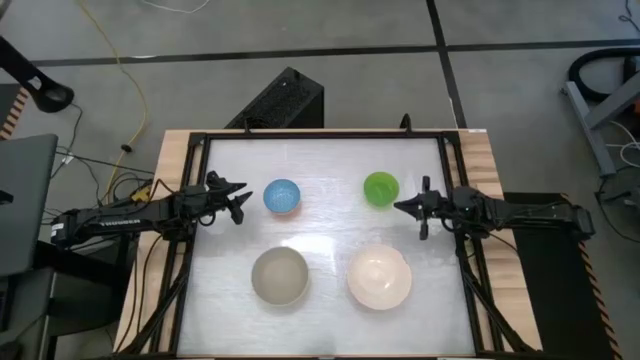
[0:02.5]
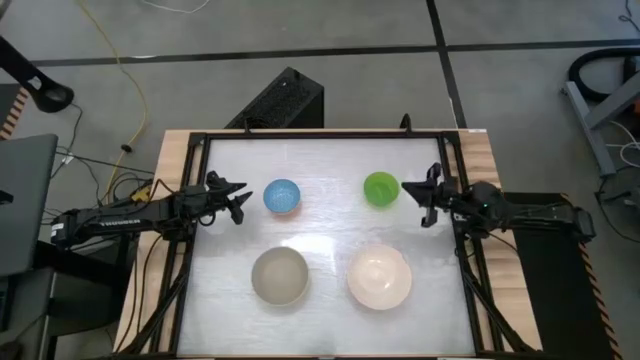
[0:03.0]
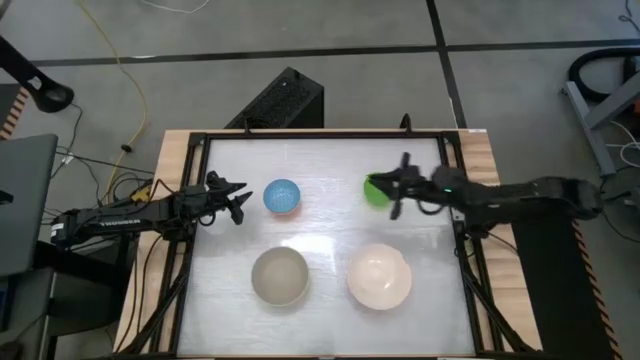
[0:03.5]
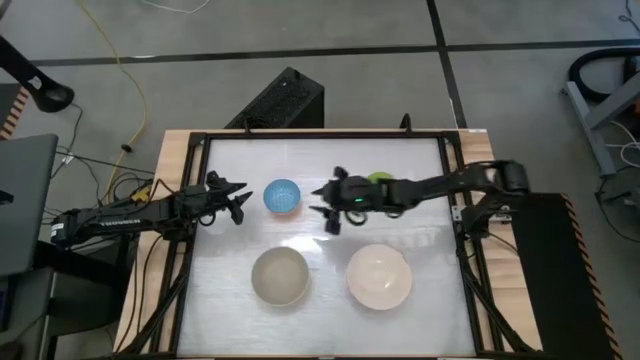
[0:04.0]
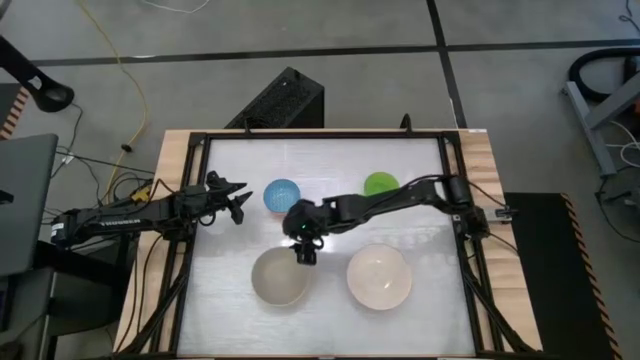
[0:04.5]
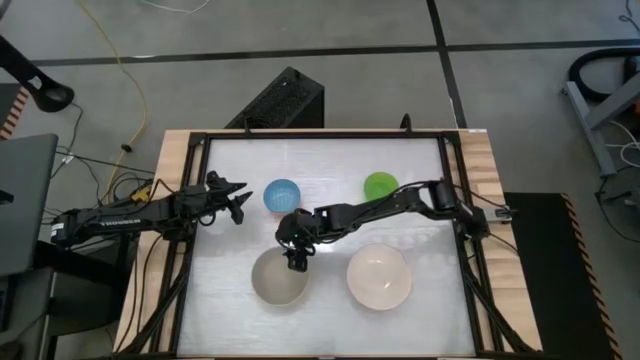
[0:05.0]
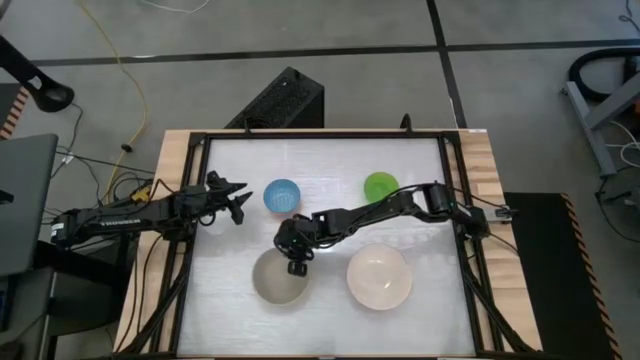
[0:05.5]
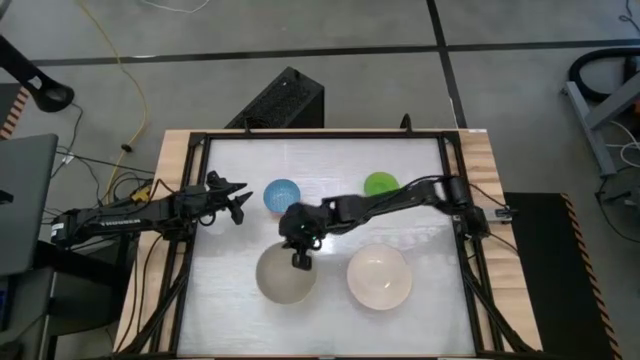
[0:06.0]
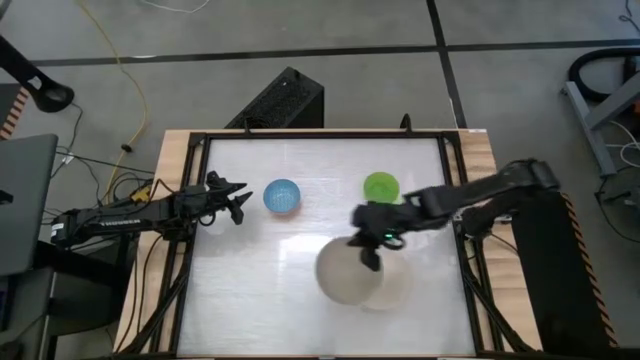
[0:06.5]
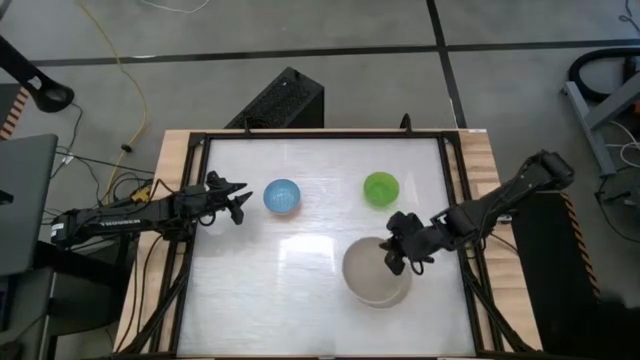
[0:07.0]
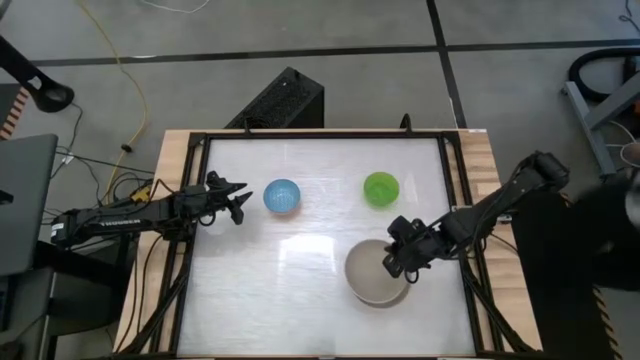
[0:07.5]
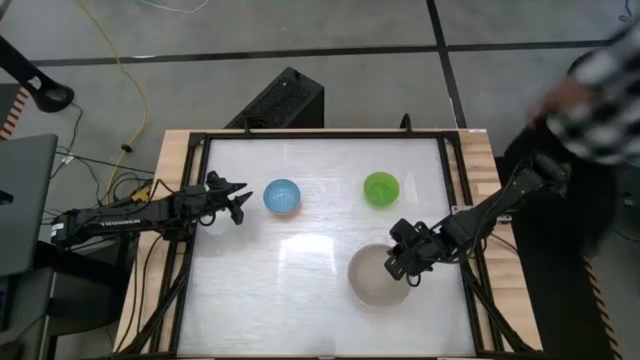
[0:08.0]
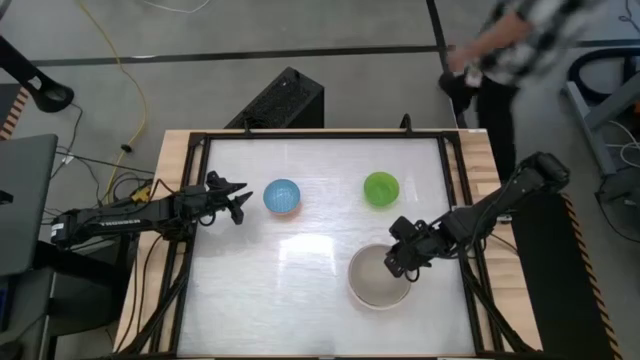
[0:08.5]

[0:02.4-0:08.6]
Stack the gray bowl on top of the white bowl

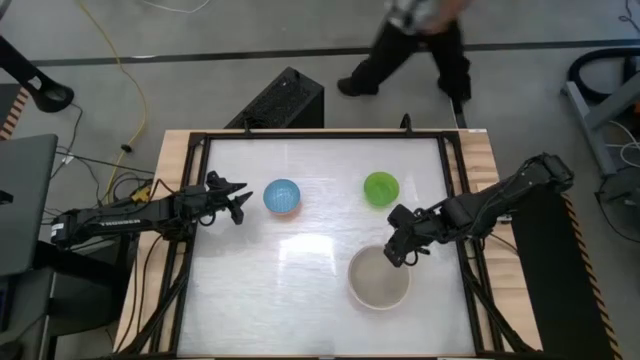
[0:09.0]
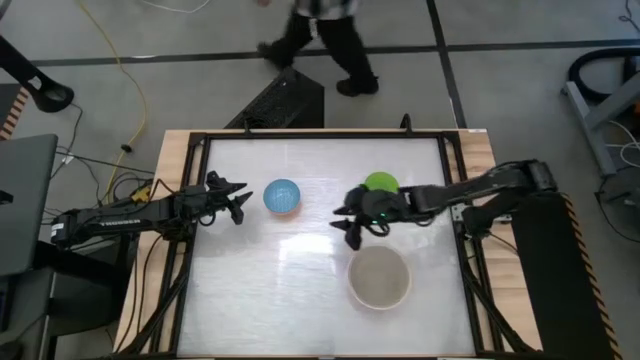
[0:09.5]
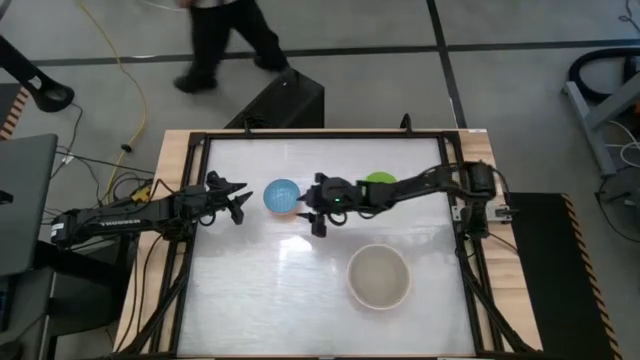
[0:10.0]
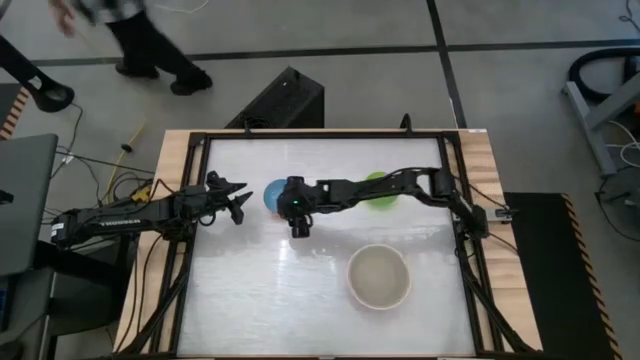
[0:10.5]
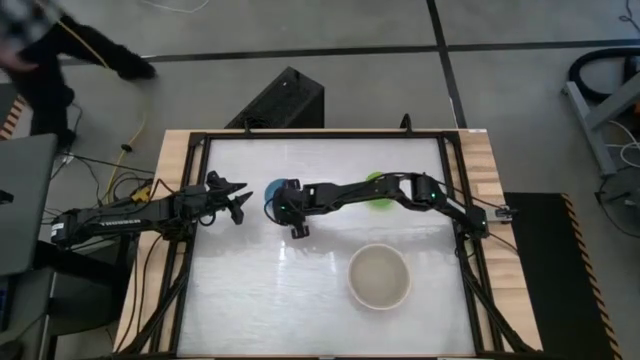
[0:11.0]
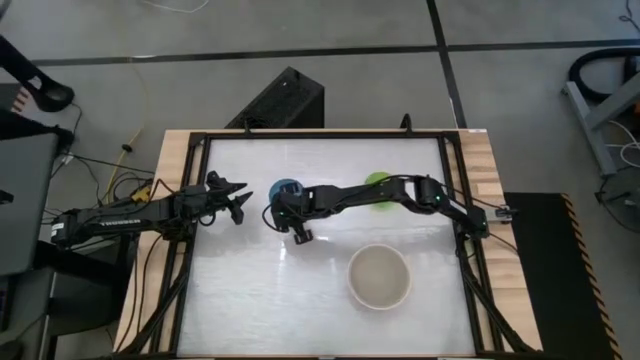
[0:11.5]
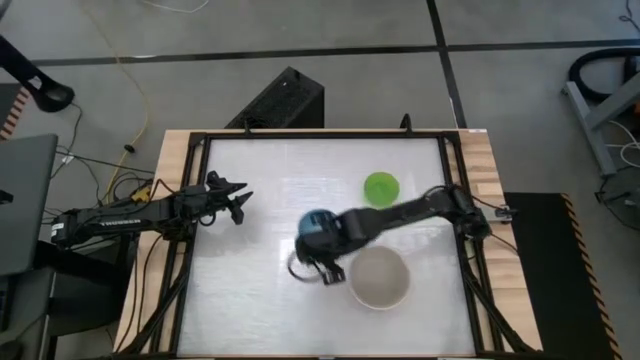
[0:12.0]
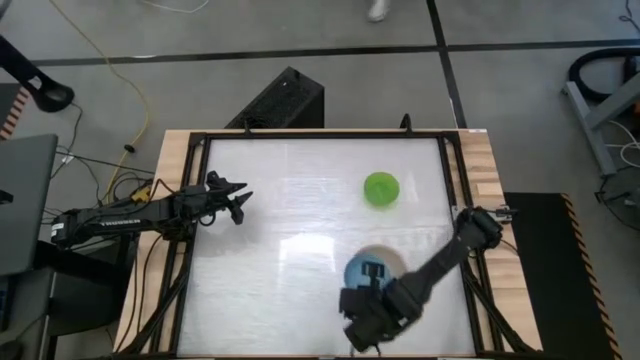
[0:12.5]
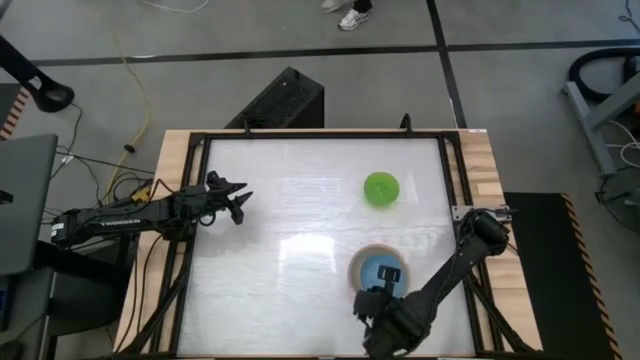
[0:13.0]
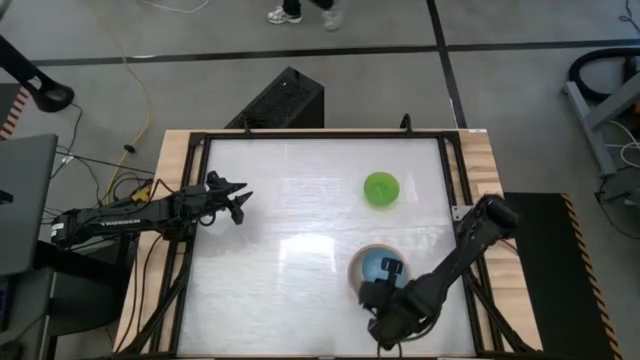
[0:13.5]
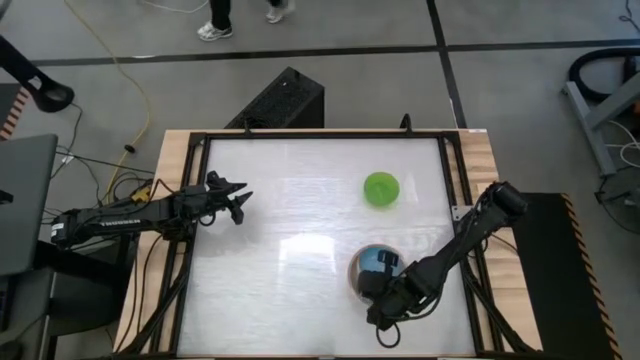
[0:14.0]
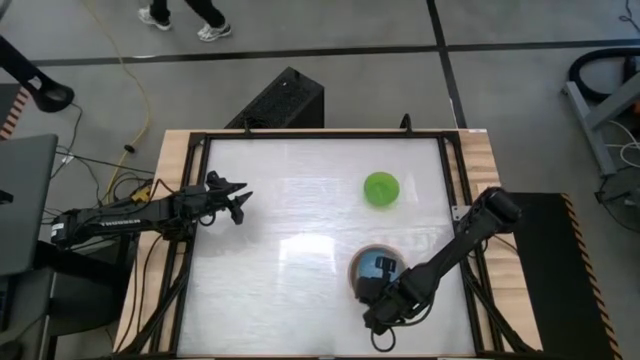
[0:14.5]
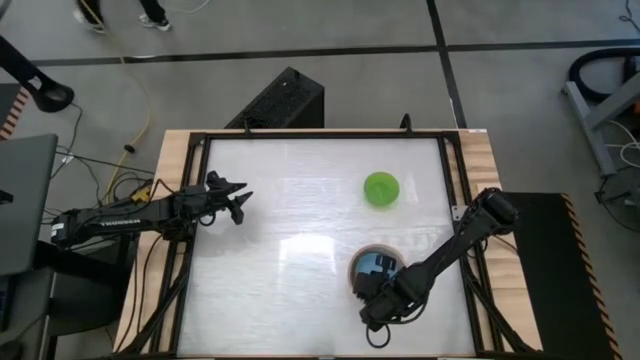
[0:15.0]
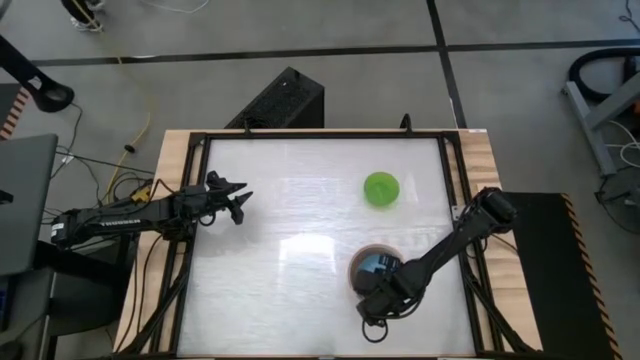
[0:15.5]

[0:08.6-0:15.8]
Stack the blue bowl on top of the gray bowl

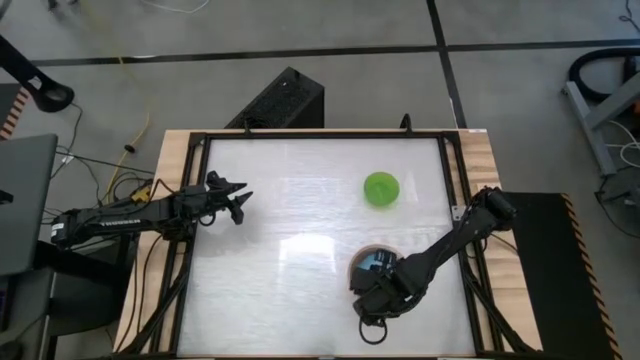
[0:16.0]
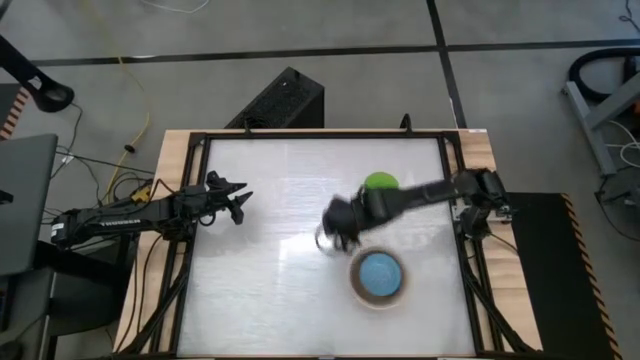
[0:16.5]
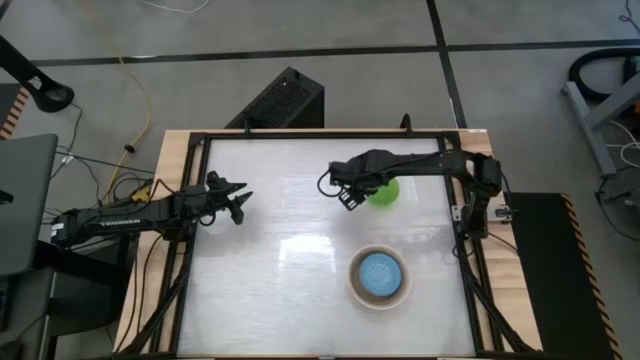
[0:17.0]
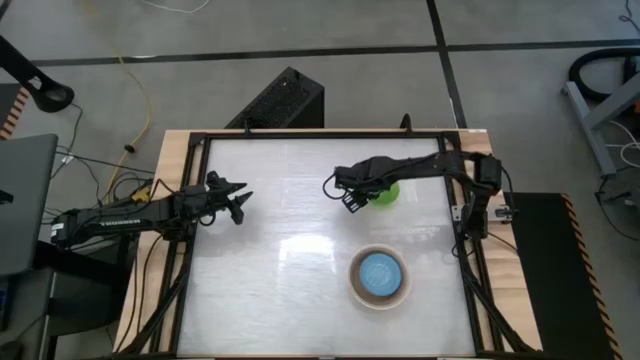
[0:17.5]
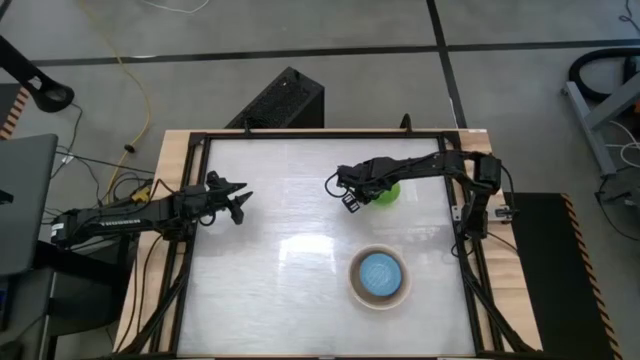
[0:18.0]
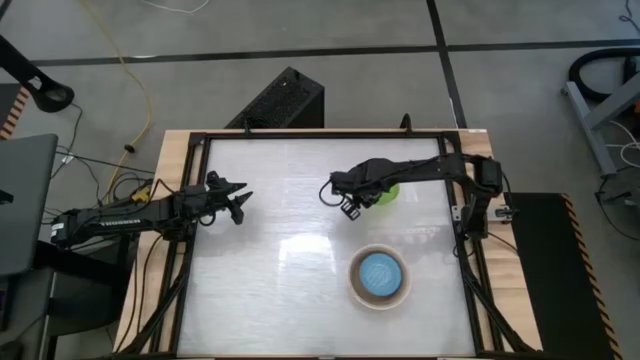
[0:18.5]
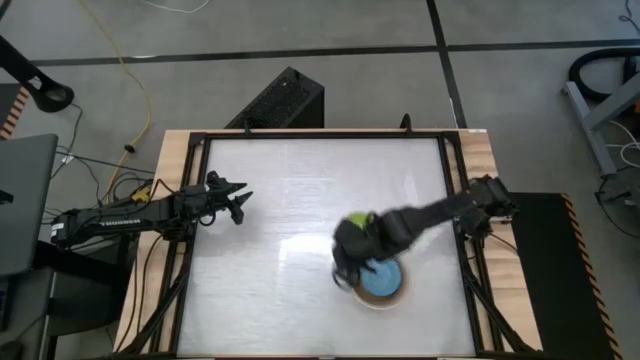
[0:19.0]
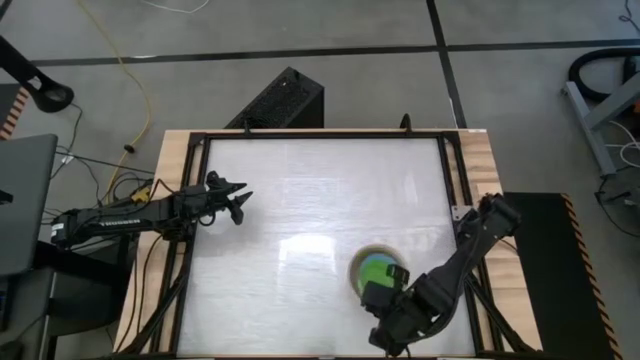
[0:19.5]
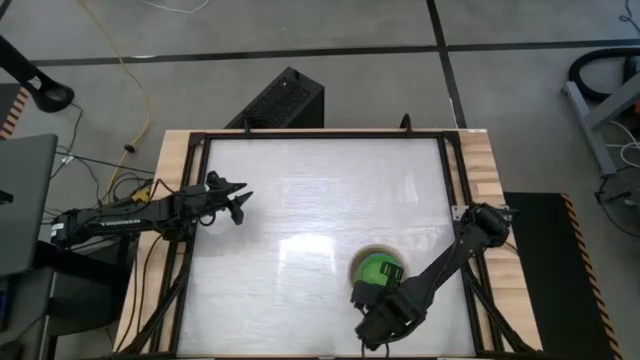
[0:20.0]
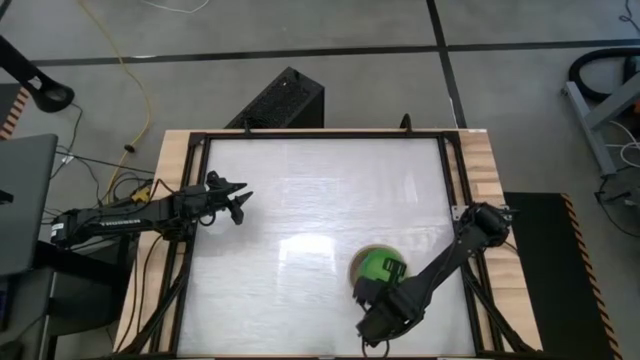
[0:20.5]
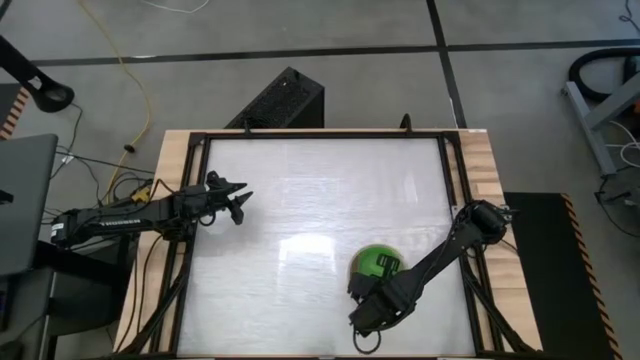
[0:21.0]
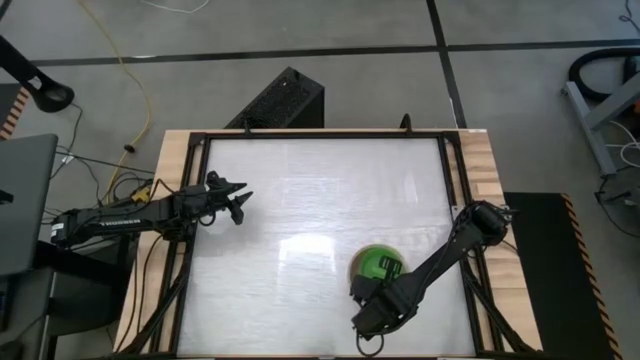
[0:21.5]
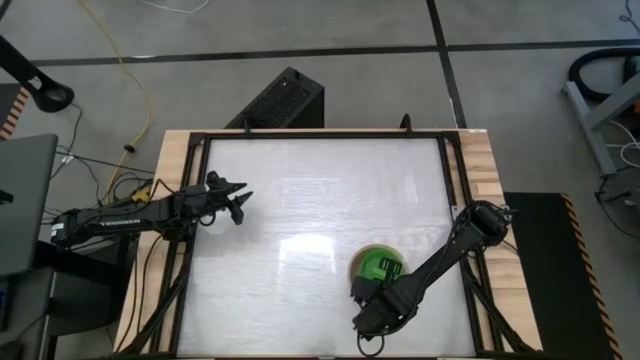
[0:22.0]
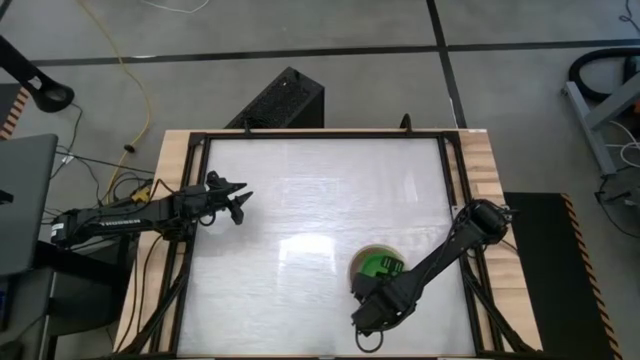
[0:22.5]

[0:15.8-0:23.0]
Stack the green bowl on top of the blue bowl
